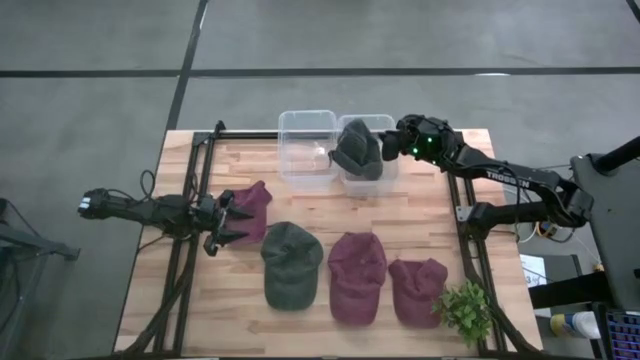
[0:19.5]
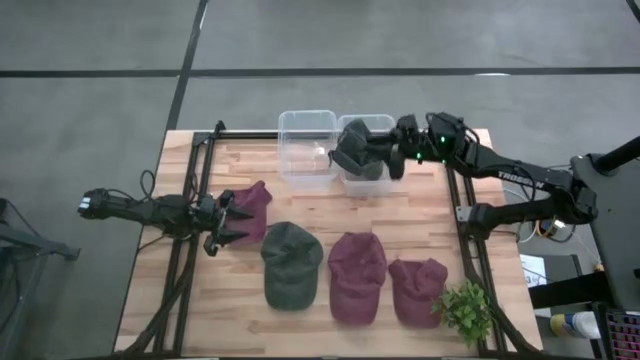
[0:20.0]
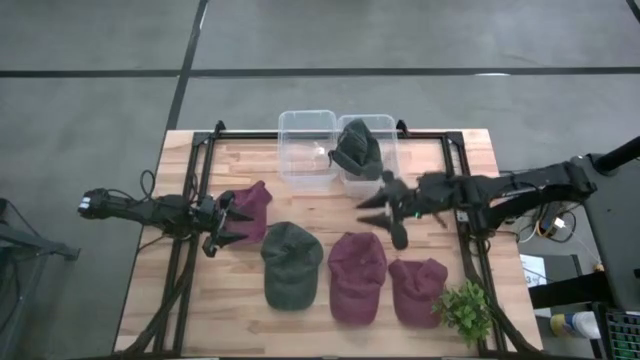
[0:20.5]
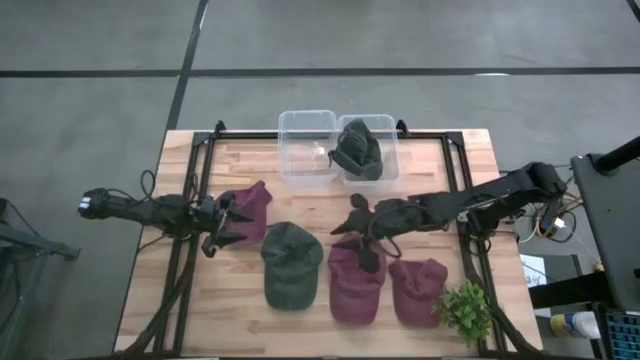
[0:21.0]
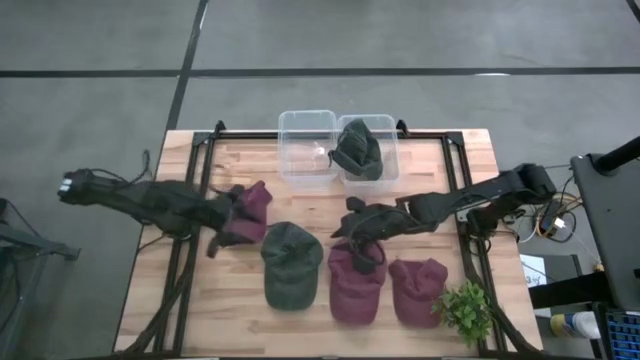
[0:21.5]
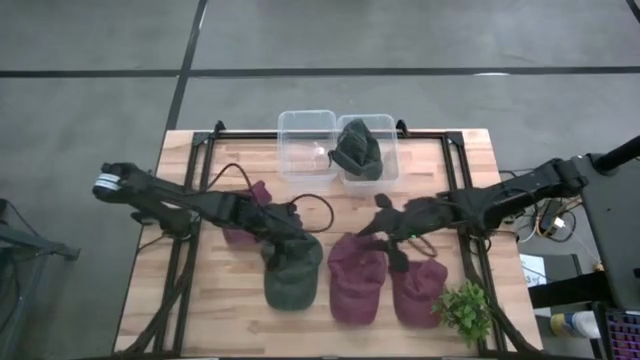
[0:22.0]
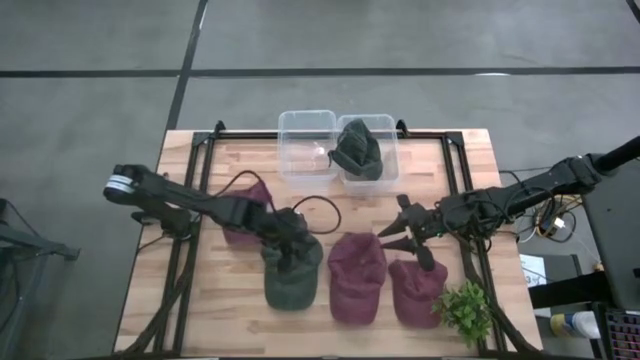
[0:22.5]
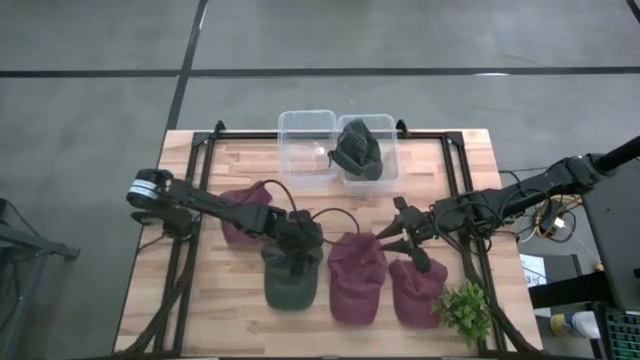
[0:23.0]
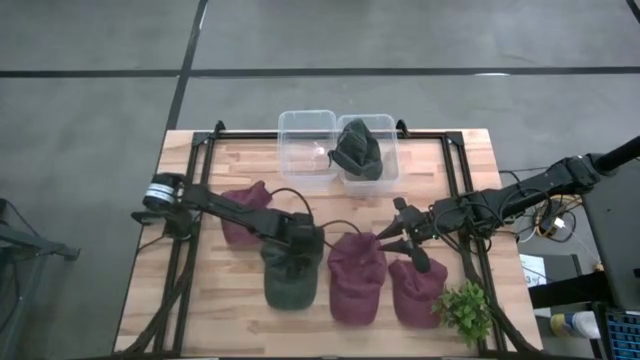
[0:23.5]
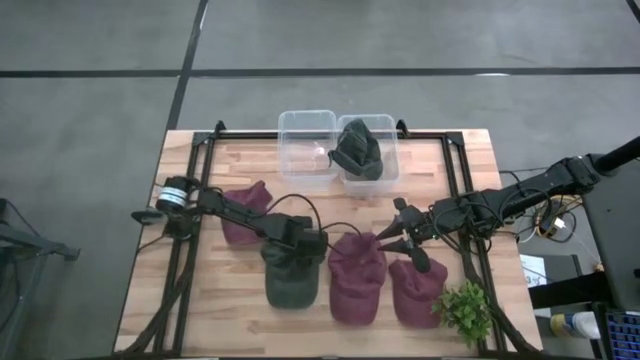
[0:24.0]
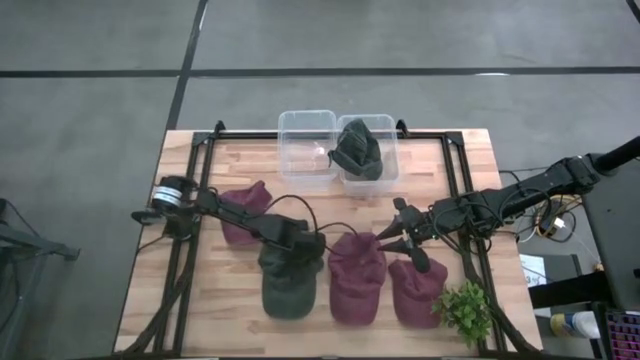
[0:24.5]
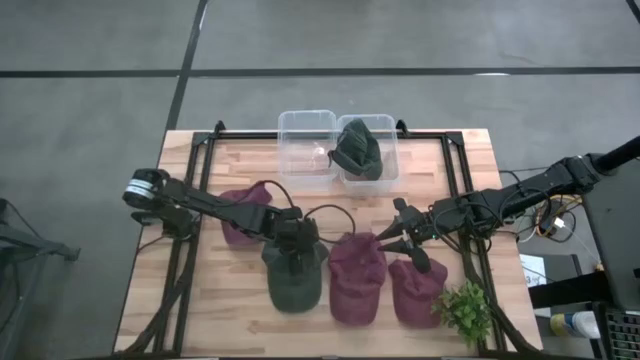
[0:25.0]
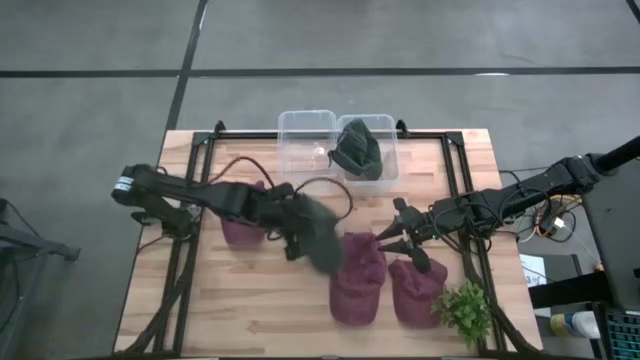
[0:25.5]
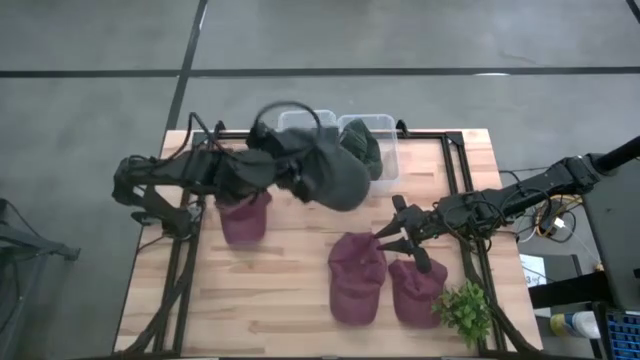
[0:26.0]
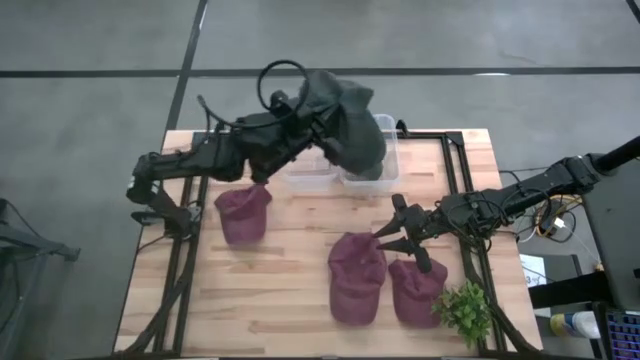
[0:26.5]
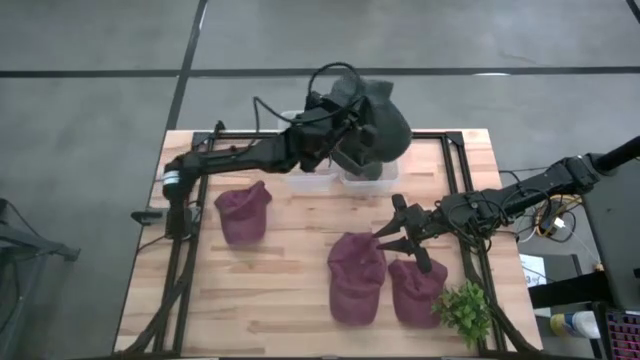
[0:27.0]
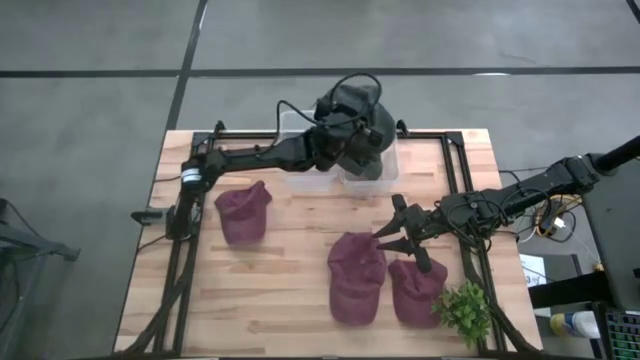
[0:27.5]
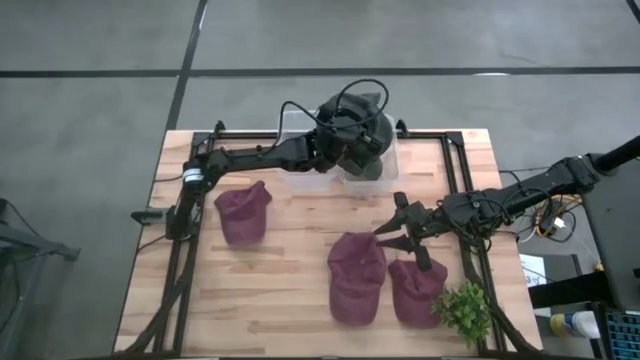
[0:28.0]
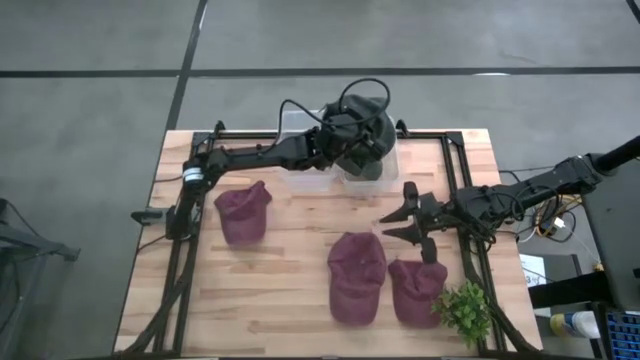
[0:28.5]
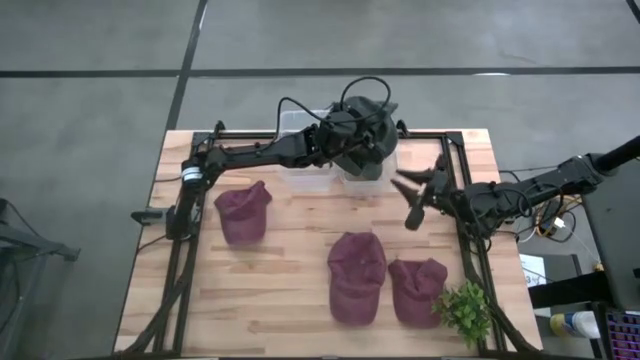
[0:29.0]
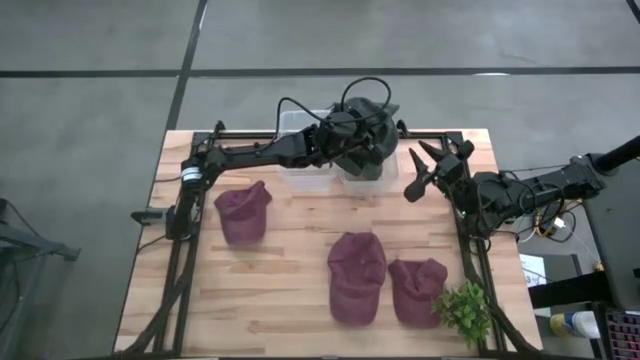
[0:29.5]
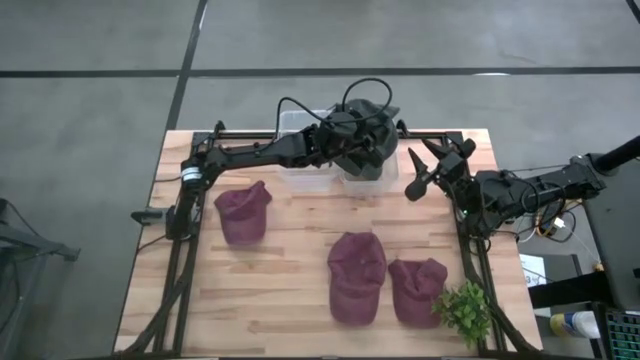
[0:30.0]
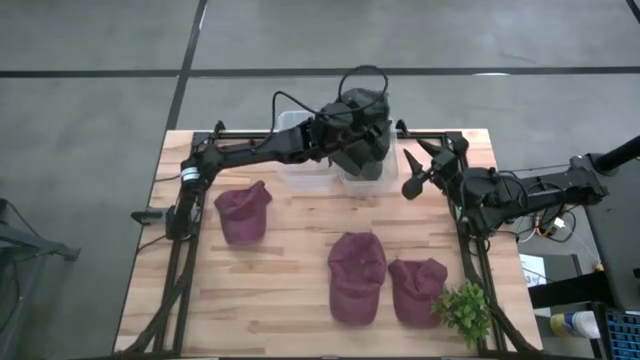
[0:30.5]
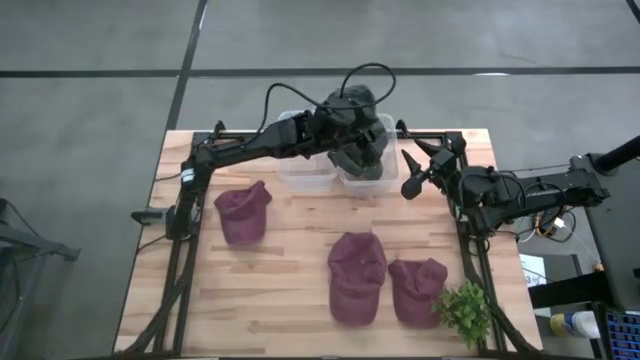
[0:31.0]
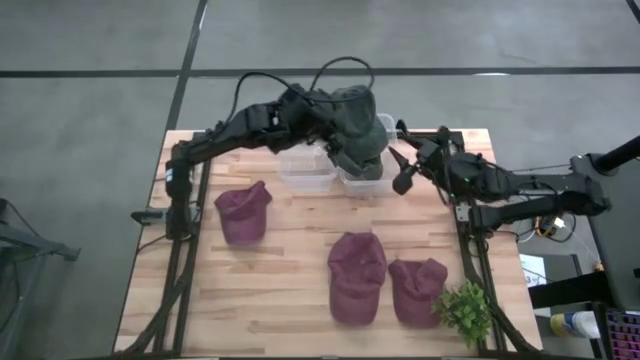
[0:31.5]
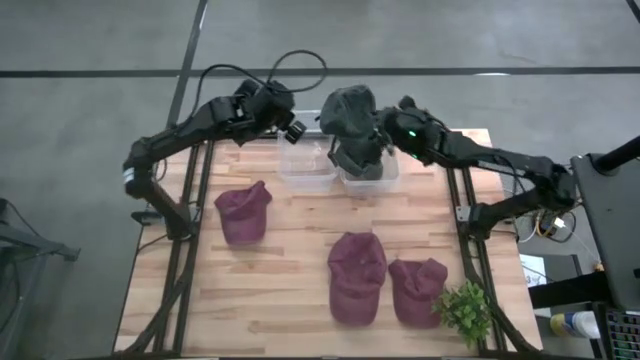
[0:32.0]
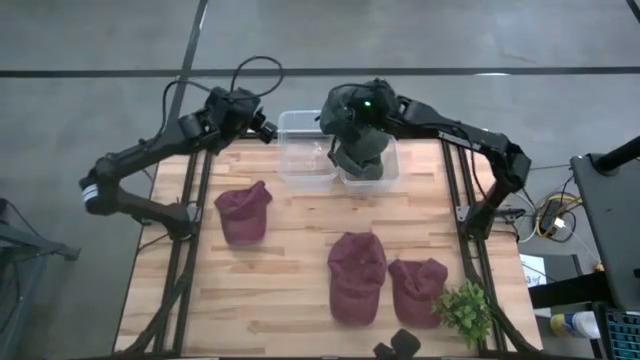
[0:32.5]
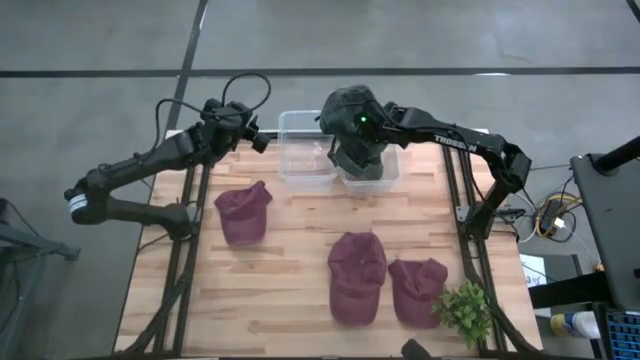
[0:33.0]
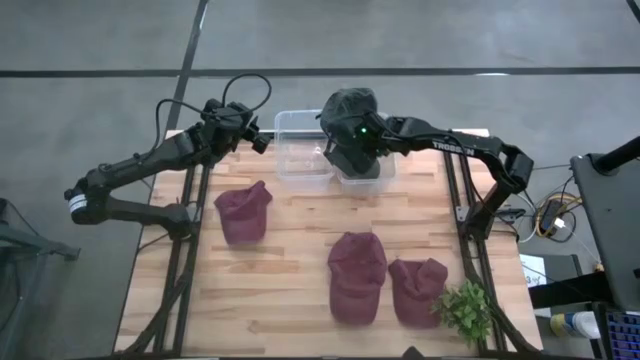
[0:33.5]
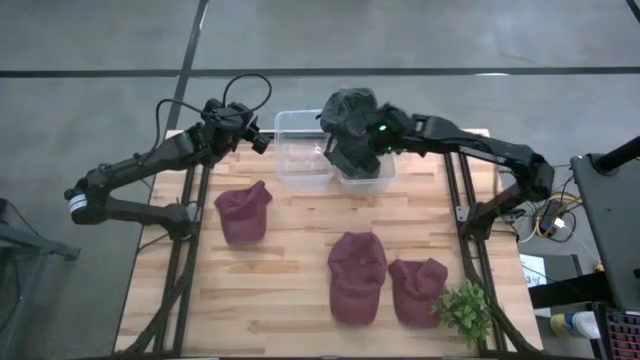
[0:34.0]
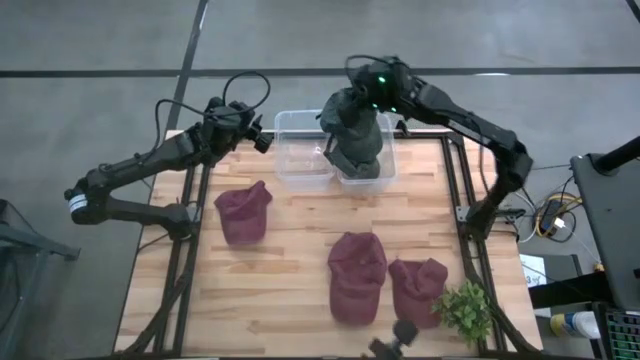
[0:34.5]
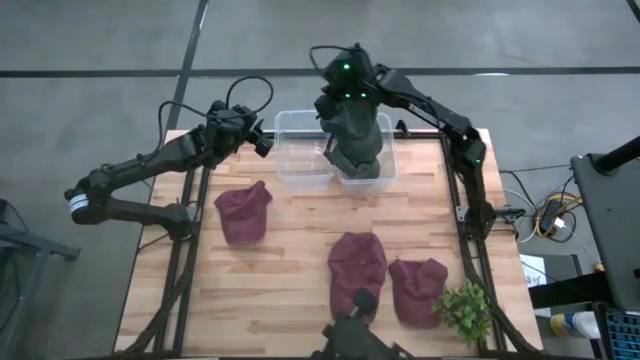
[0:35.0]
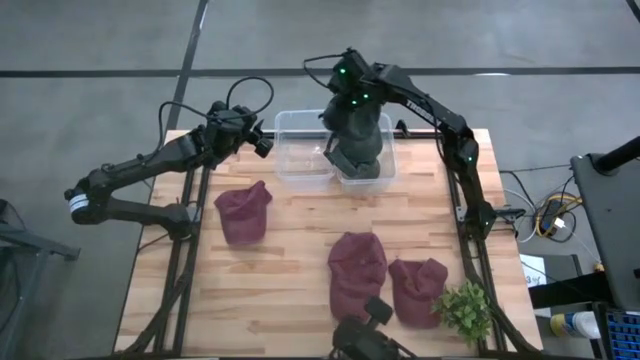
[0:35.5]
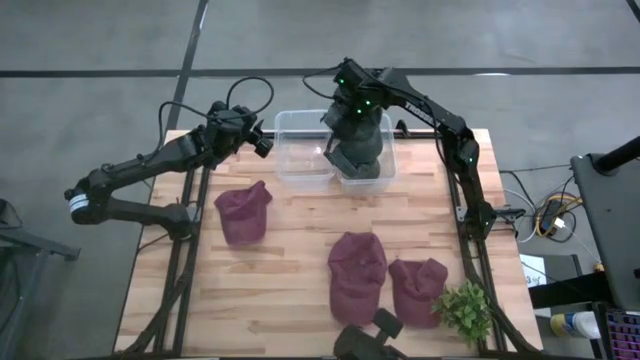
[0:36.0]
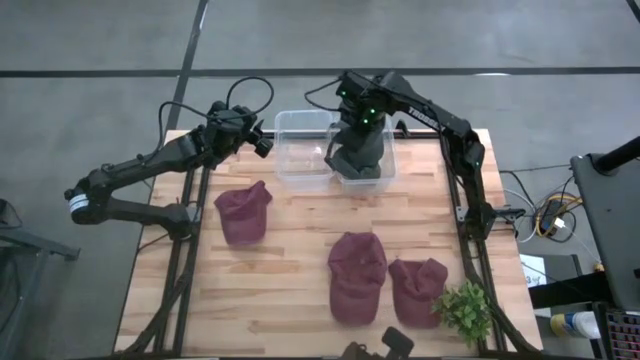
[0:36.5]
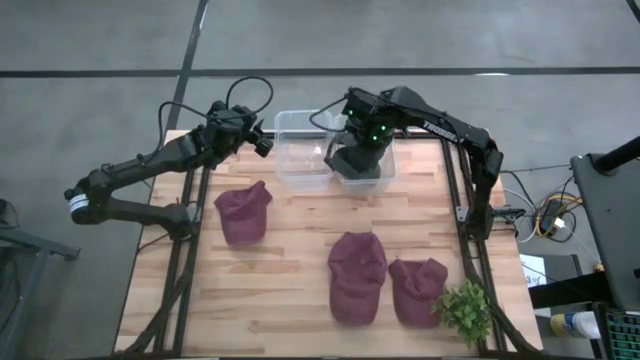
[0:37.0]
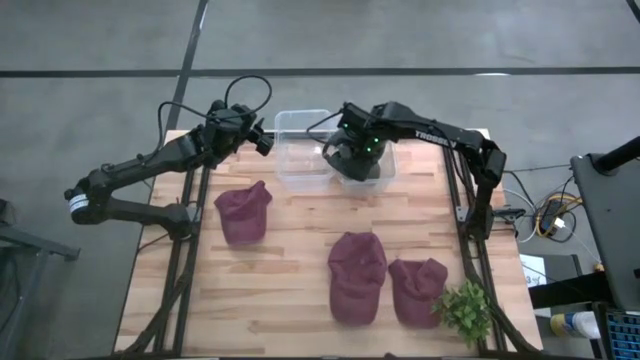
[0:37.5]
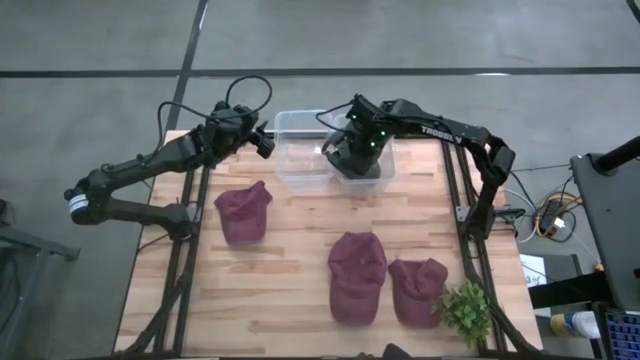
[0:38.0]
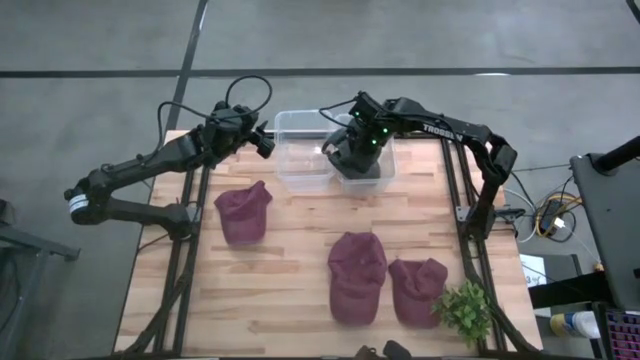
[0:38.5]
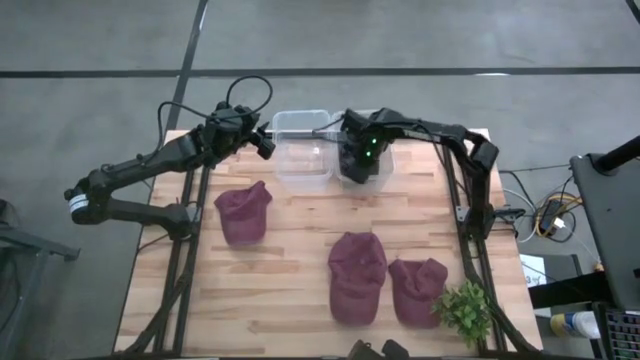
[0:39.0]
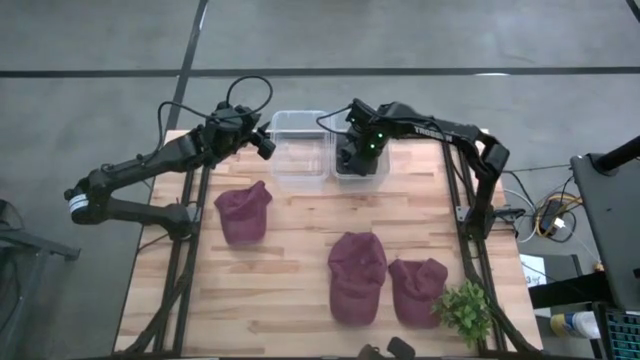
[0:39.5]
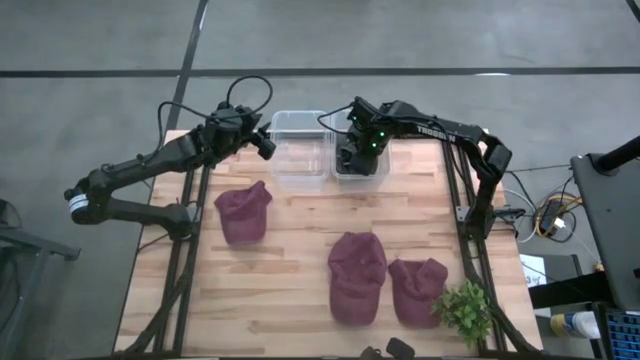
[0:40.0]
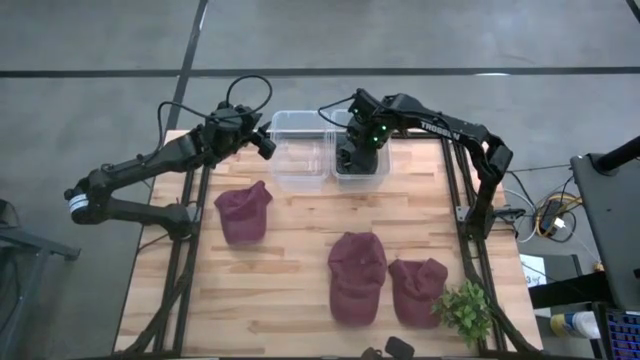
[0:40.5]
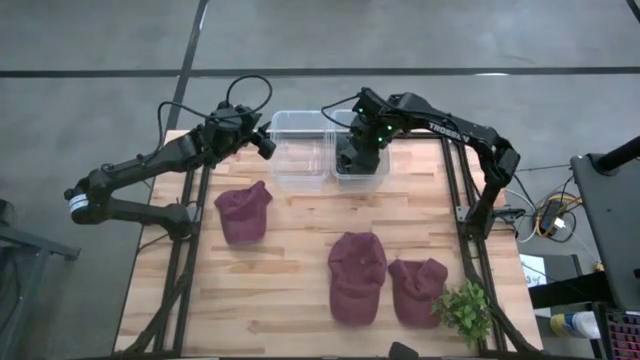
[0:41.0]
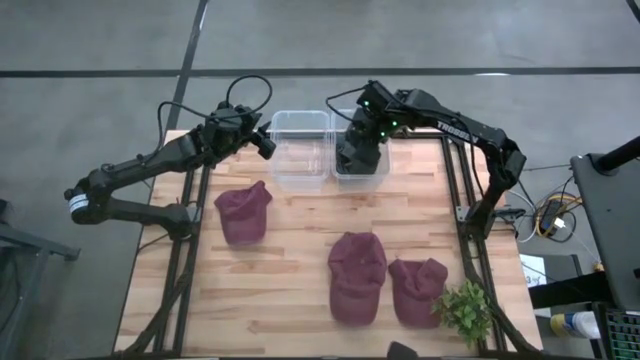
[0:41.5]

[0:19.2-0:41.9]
Task: Pick & Place hat
Put the black cap into the right transparent bin
